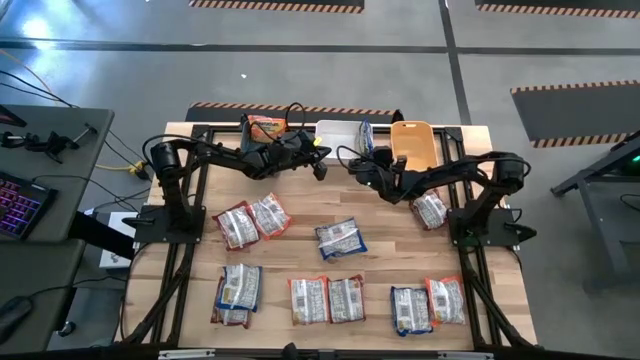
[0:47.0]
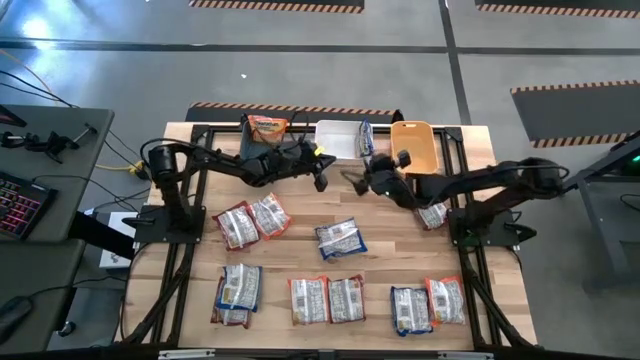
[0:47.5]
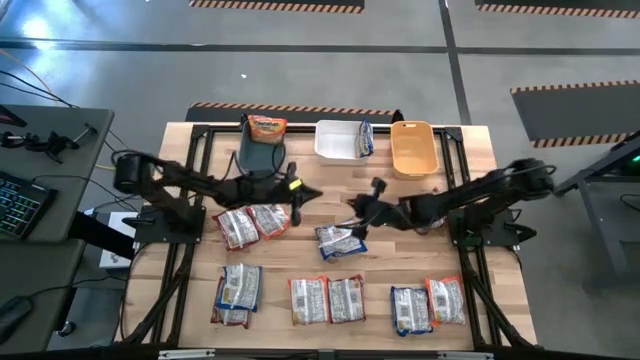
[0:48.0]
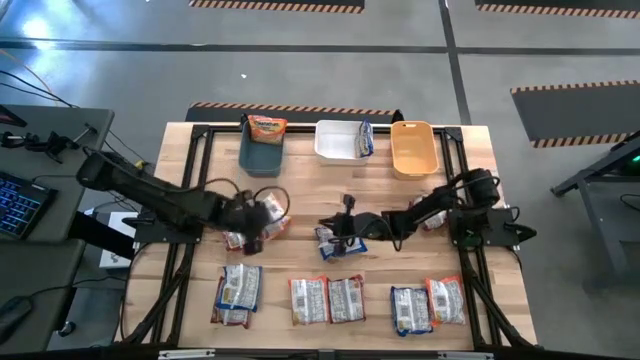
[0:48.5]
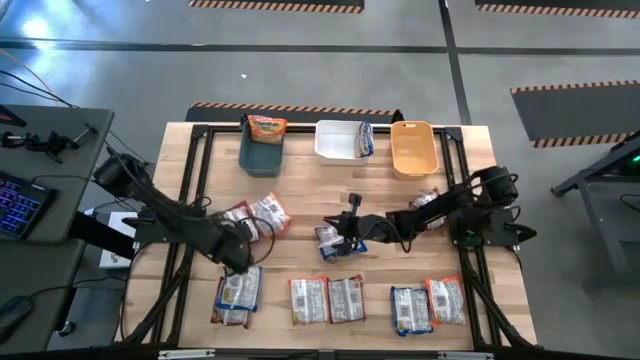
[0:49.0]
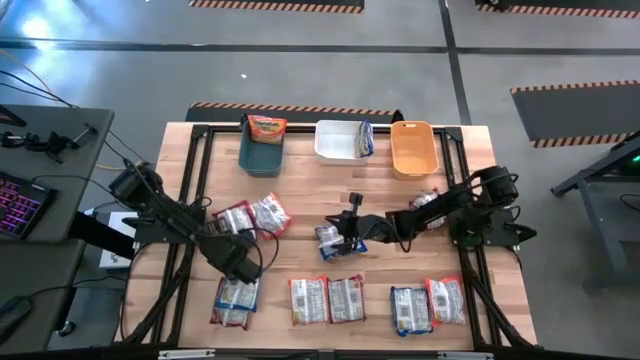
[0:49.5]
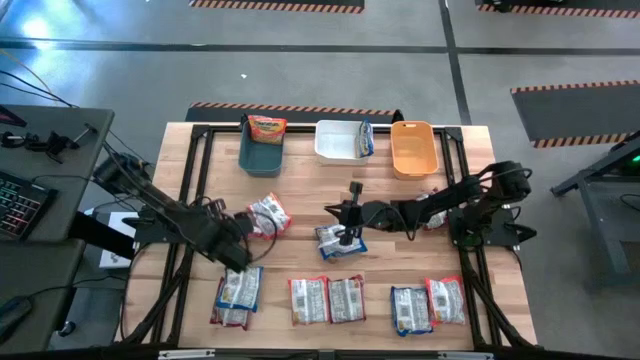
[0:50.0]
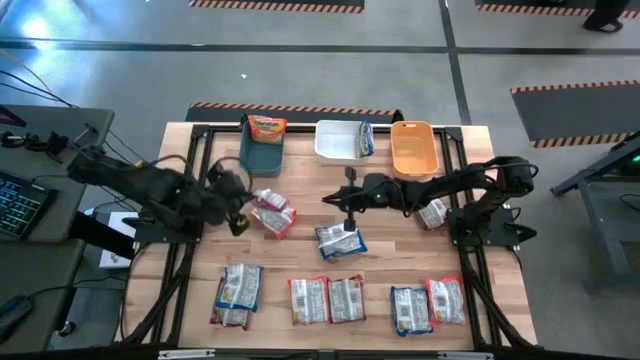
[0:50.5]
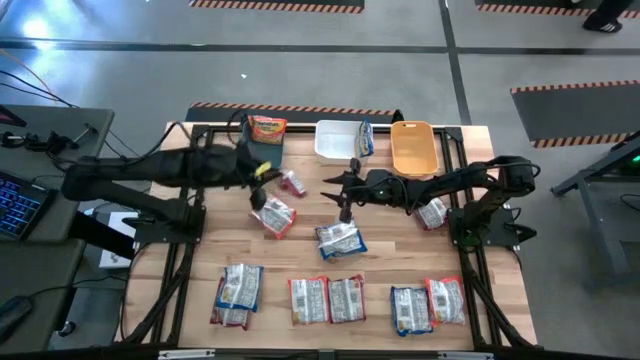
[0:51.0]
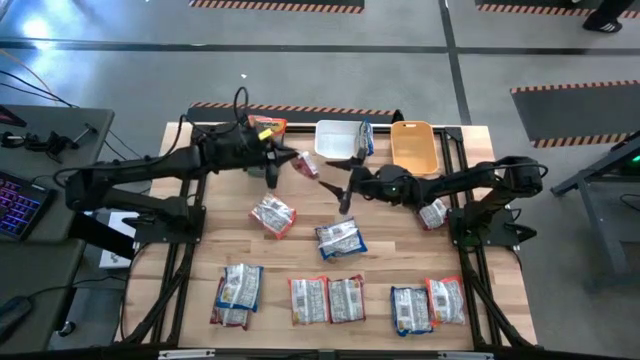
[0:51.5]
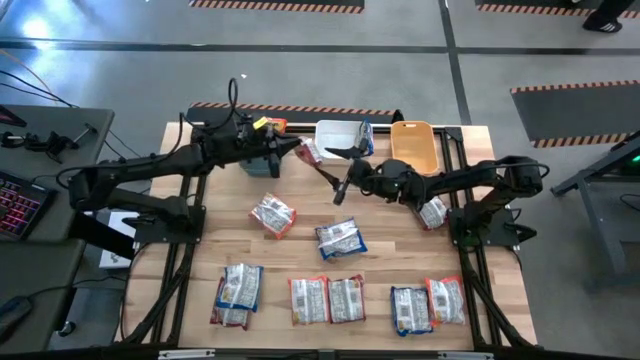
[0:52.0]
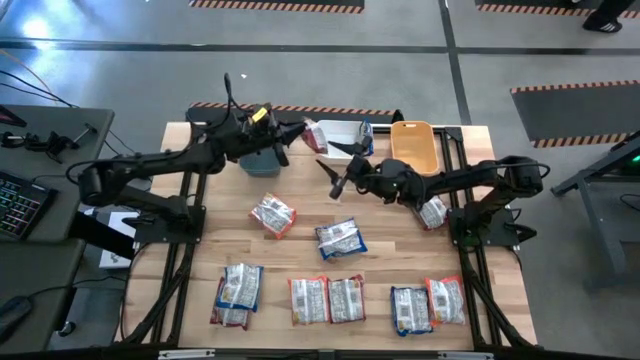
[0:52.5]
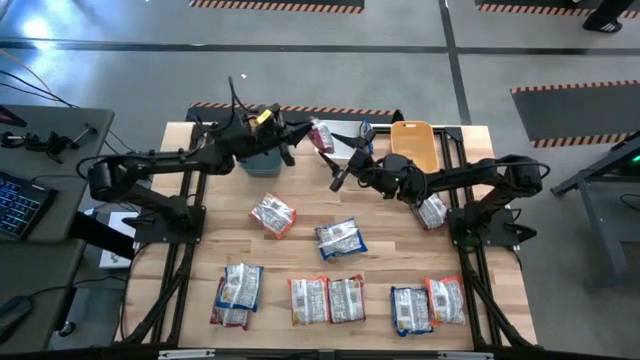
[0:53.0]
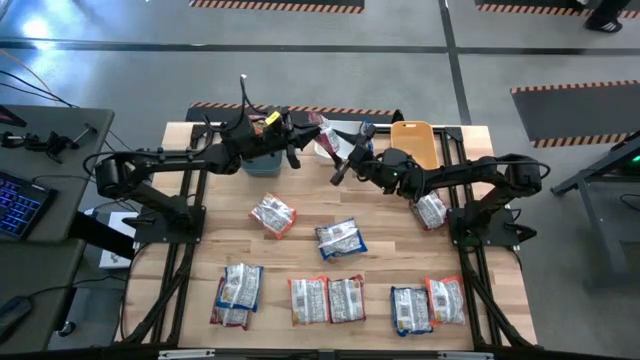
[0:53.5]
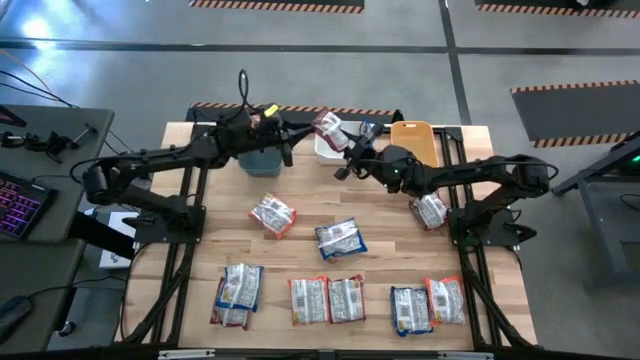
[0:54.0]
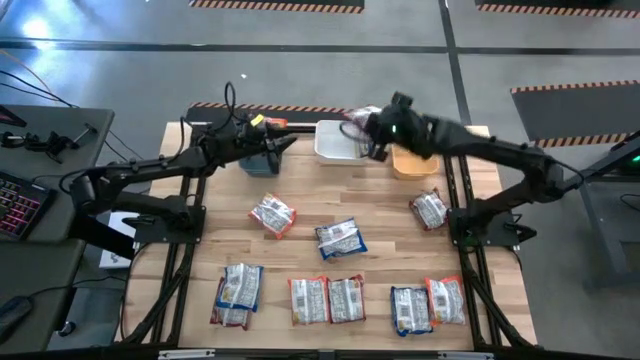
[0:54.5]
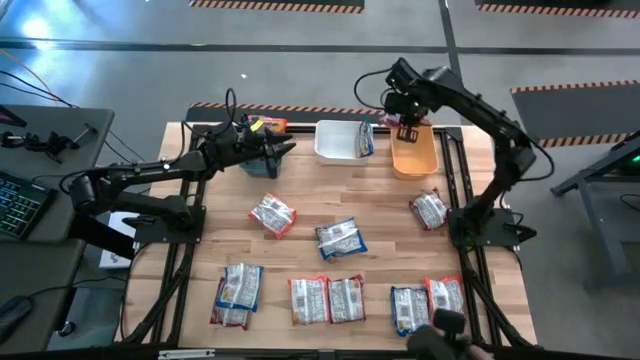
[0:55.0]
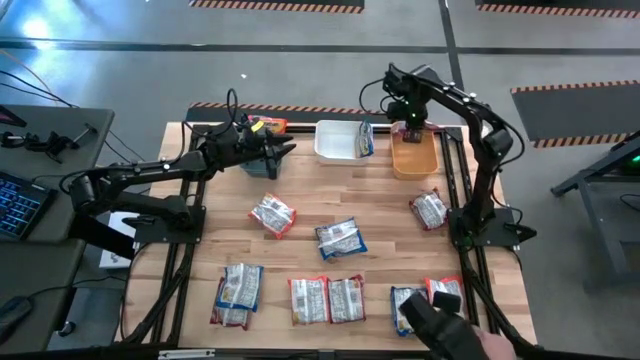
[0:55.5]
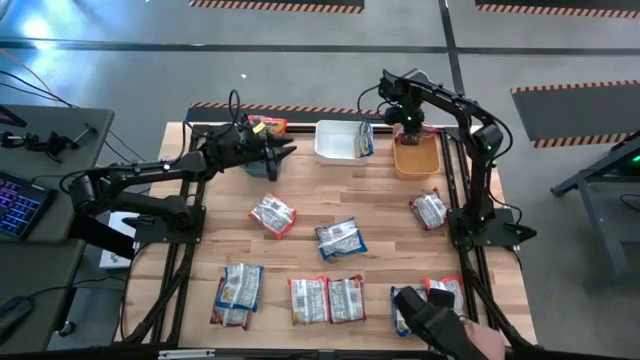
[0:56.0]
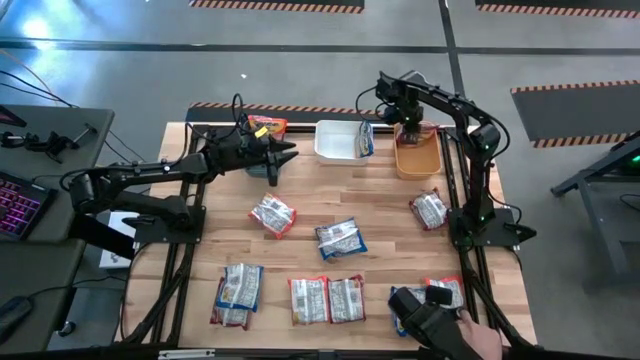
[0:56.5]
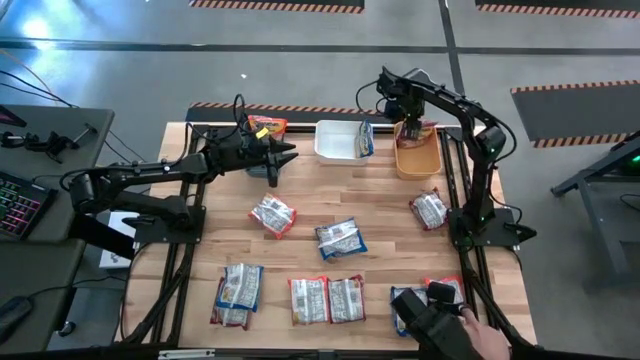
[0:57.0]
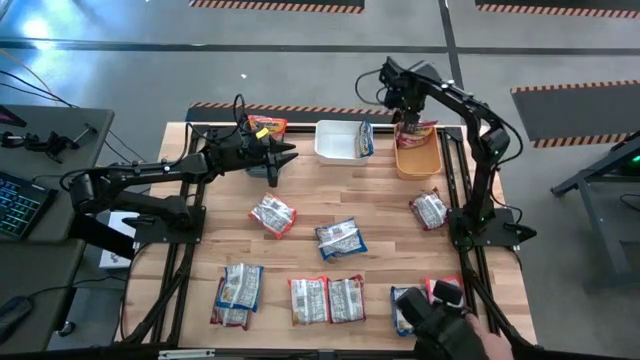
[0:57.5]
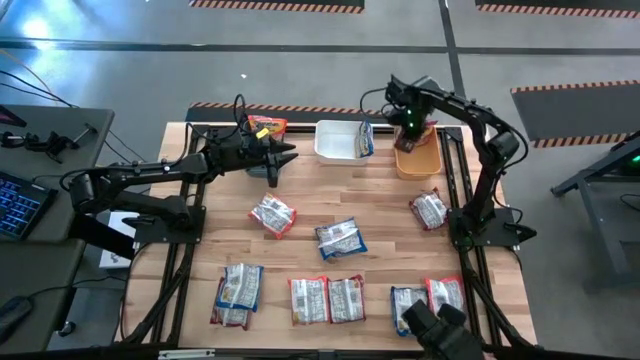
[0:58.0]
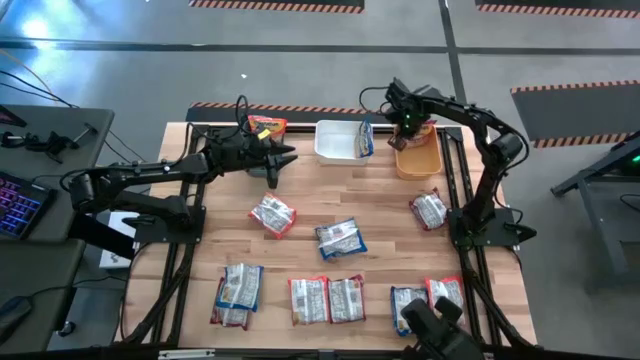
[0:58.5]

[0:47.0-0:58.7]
Task: Sort Maruchan noodles
Put the top left red noodle pack into the yellow bin

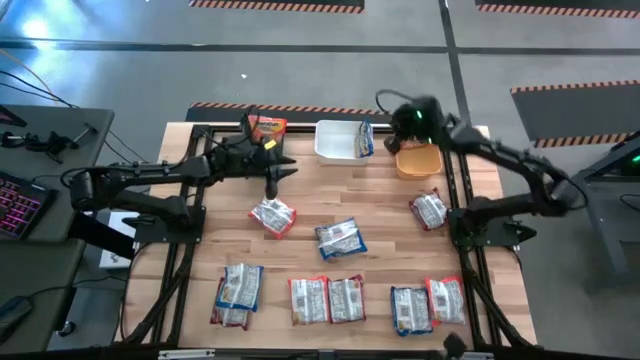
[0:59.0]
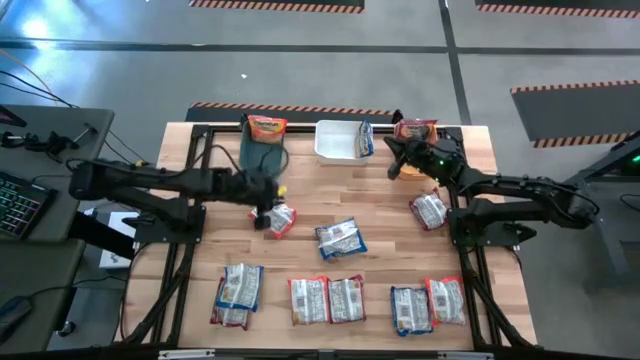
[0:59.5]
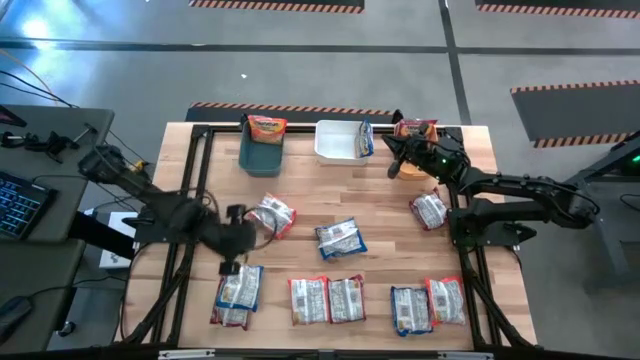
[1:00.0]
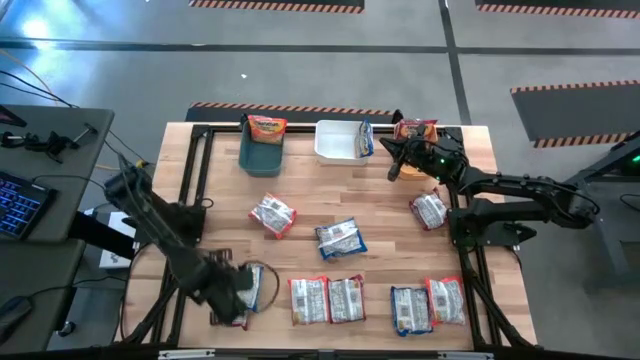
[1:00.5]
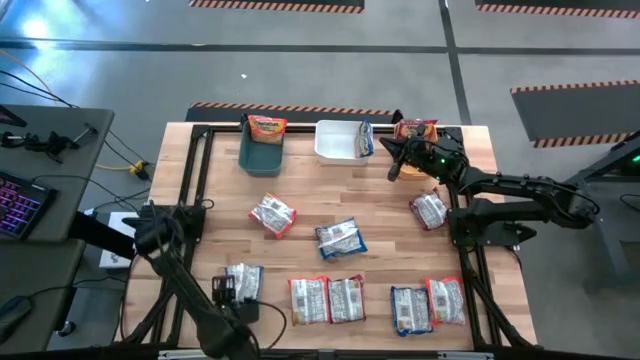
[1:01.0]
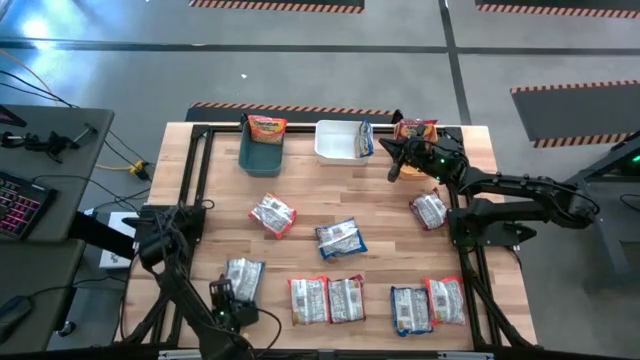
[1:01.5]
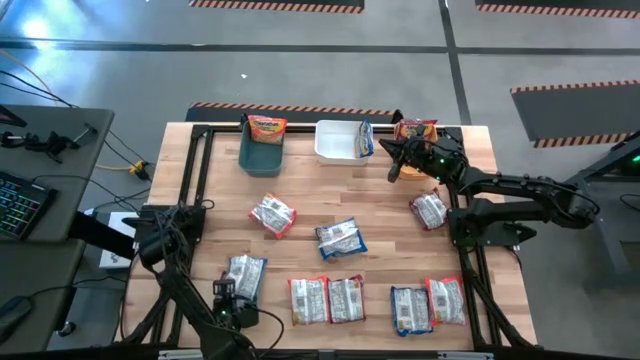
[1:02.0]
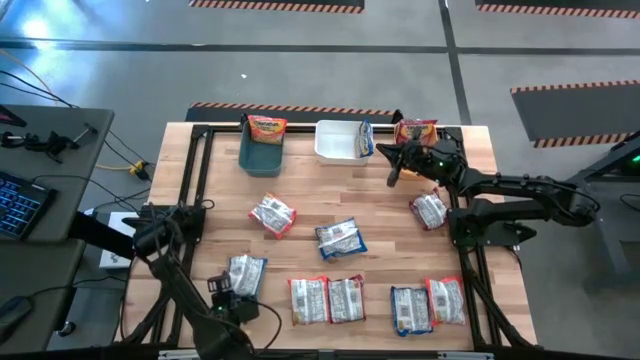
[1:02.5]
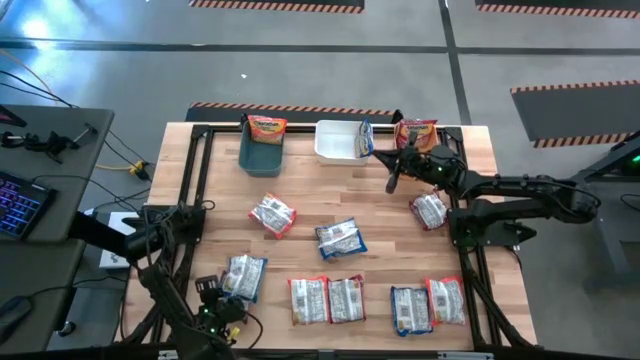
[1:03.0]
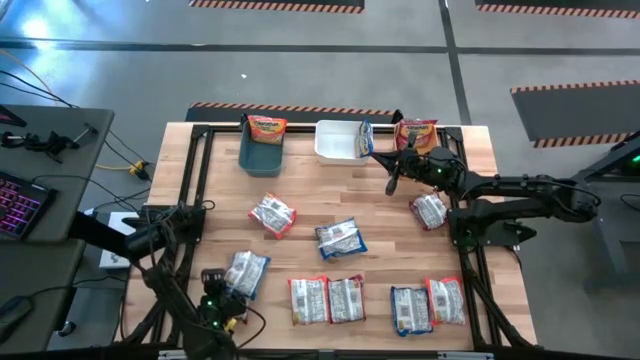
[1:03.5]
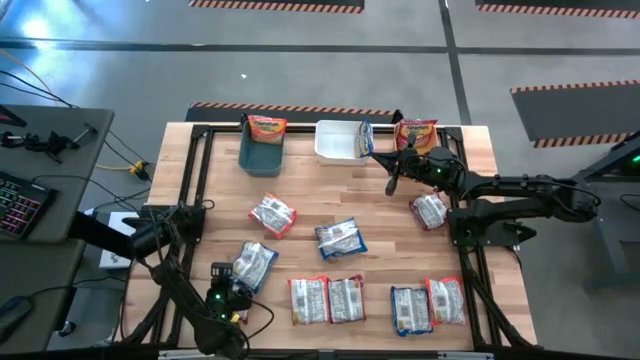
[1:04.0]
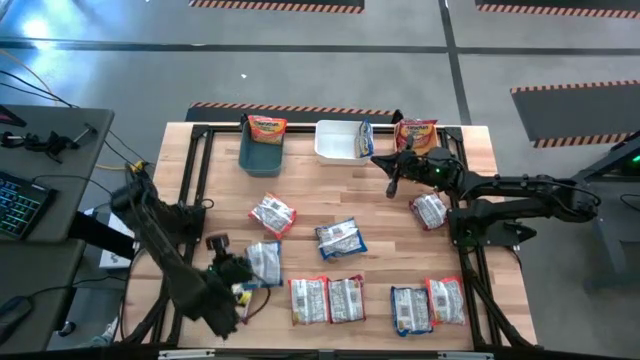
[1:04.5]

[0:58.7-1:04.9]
Put the bottom left blue noodle pack into the white bin

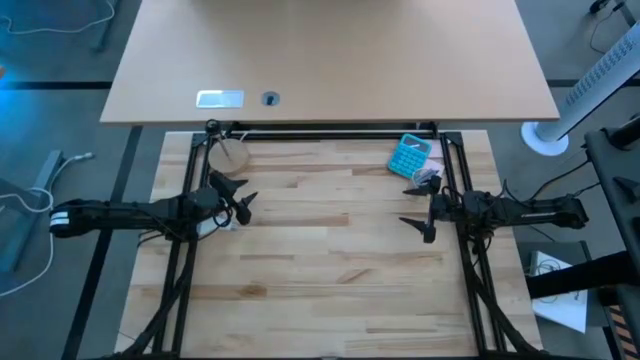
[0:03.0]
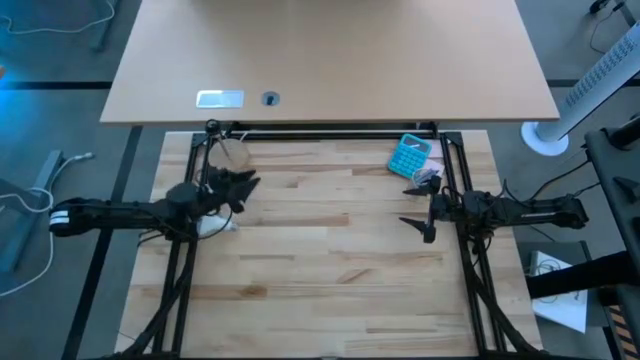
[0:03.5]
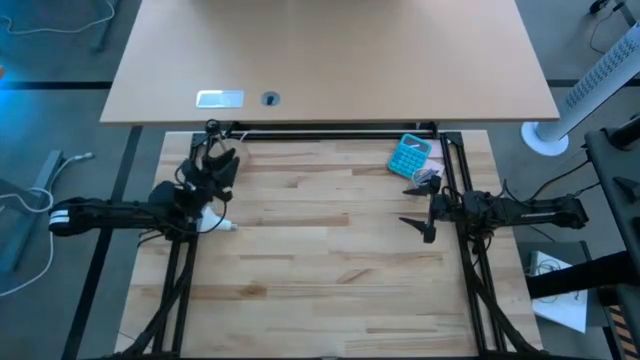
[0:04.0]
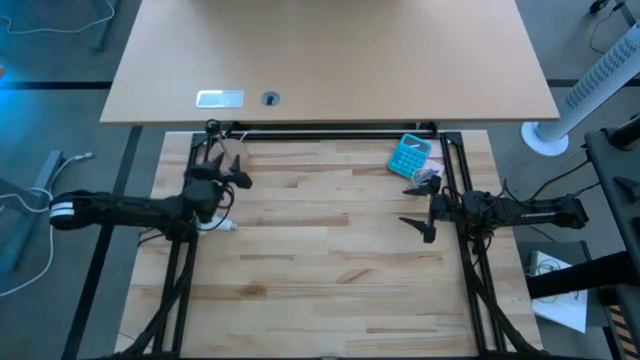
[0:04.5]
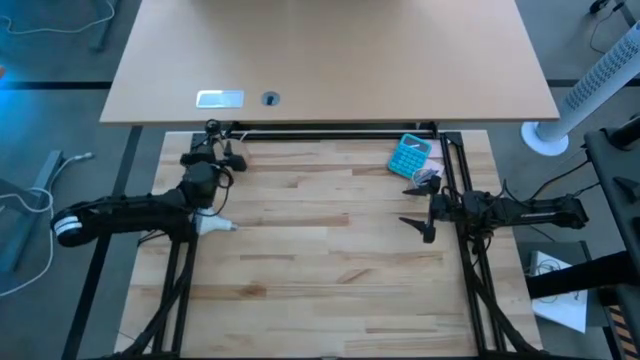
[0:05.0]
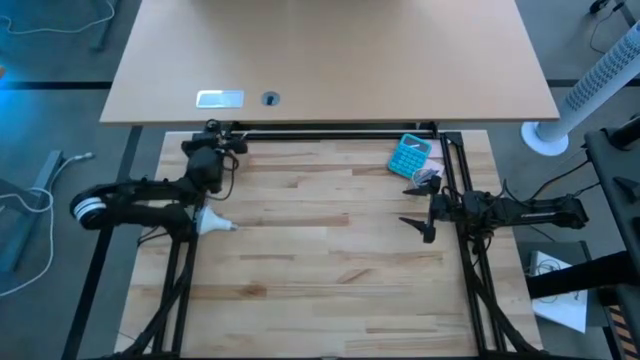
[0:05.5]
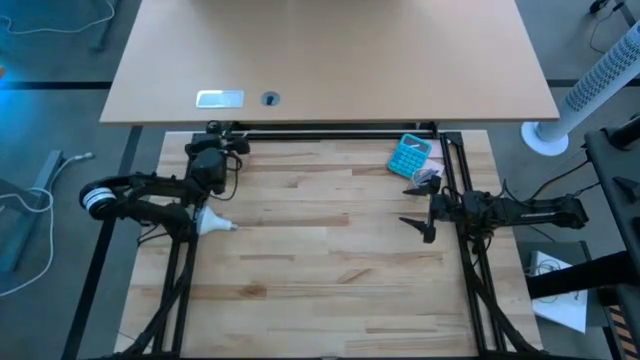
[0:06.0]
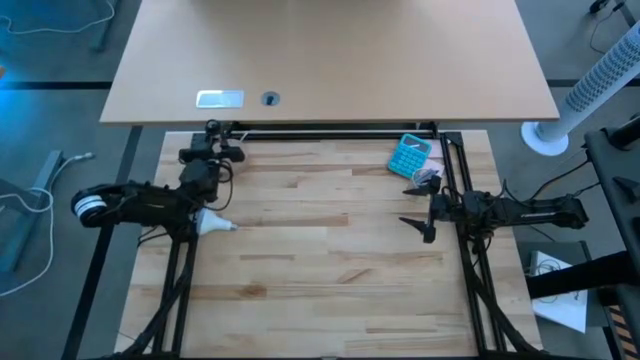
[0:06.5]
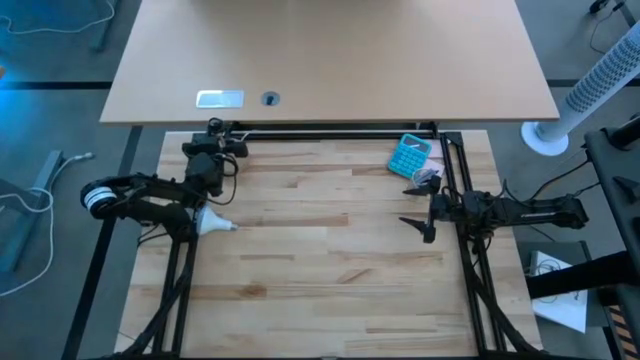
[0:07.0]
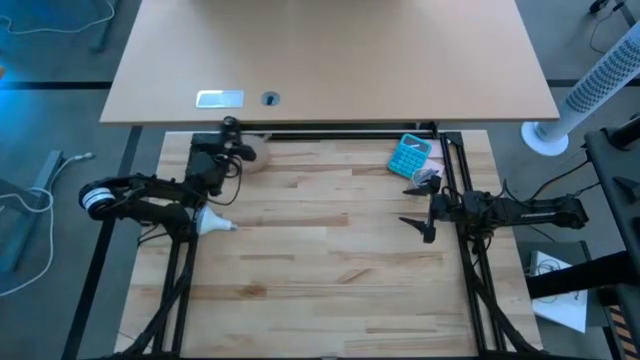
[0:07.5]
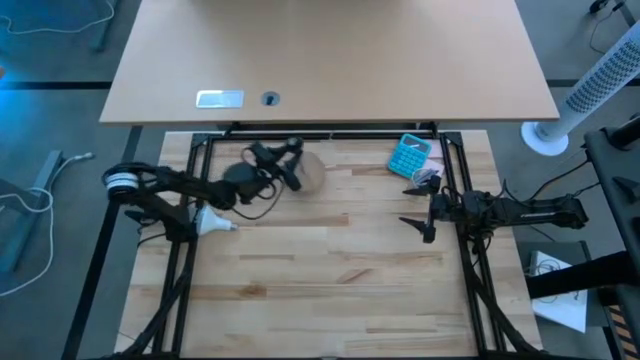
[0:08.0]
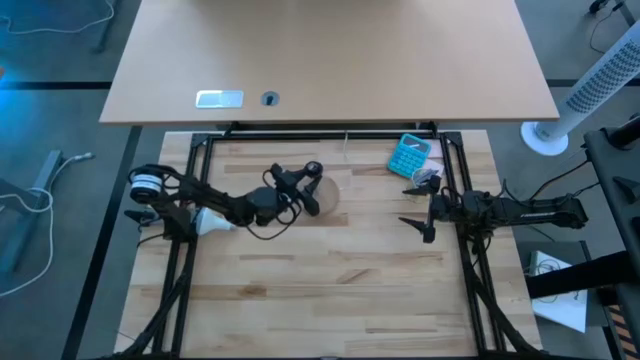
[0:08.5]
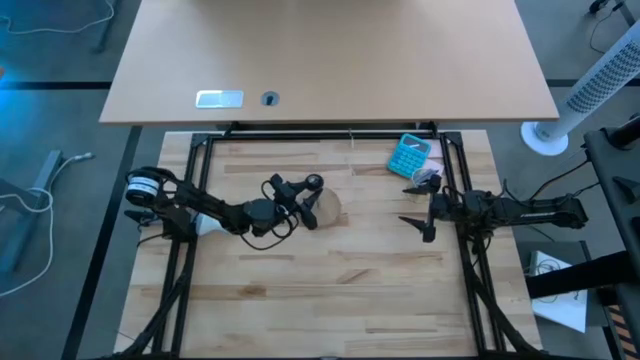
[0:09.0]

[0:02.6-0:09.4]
Task: Screw lightbulb
Move the table lamp to the center of the table
